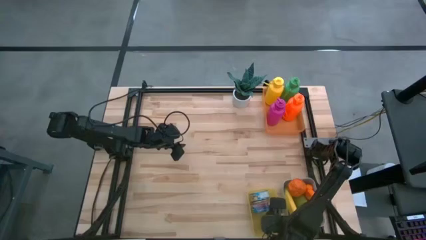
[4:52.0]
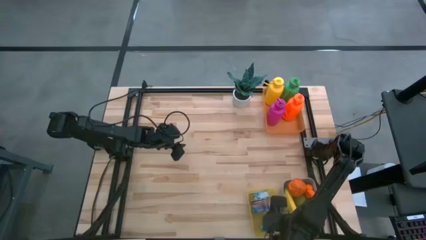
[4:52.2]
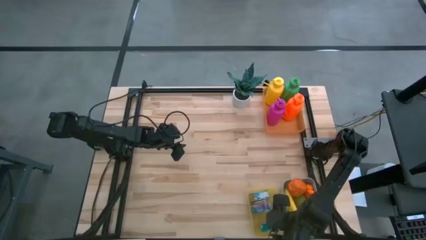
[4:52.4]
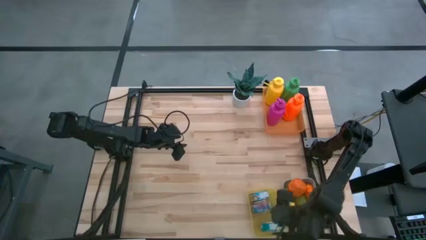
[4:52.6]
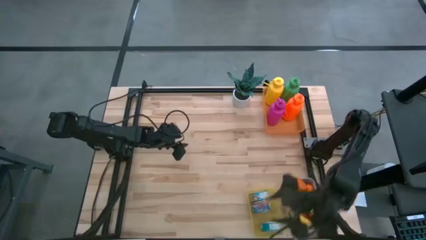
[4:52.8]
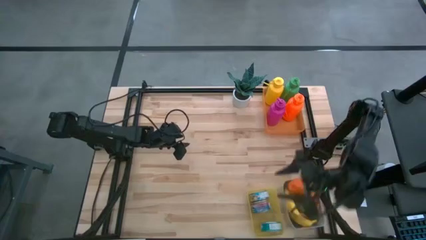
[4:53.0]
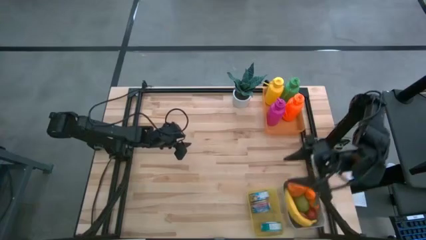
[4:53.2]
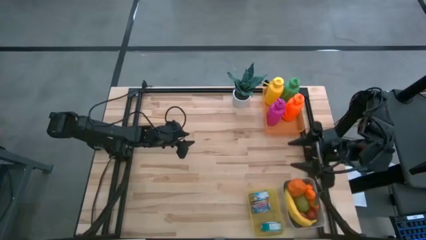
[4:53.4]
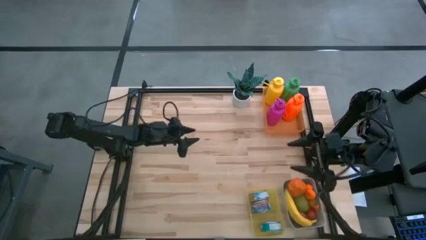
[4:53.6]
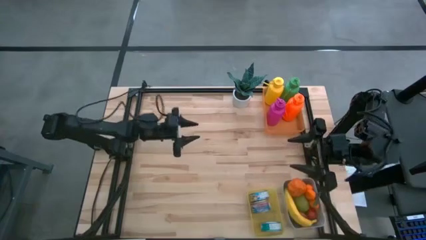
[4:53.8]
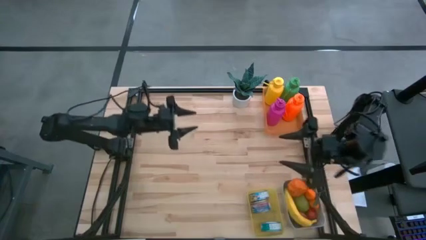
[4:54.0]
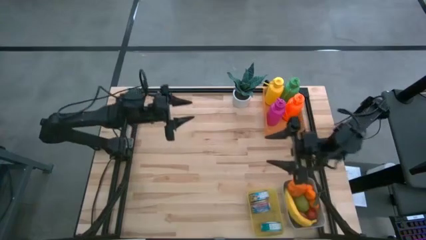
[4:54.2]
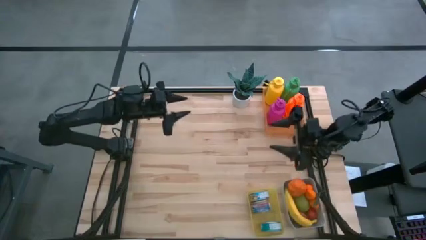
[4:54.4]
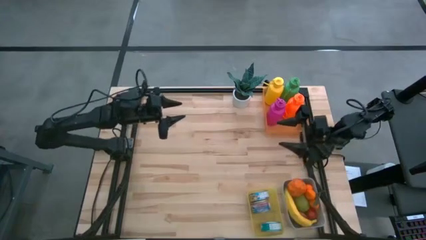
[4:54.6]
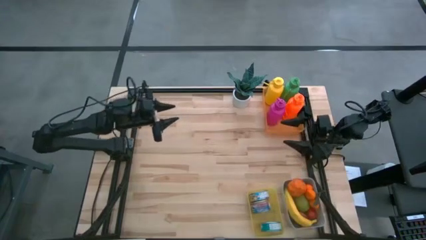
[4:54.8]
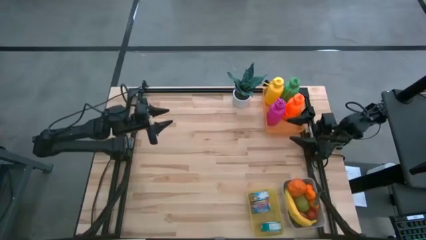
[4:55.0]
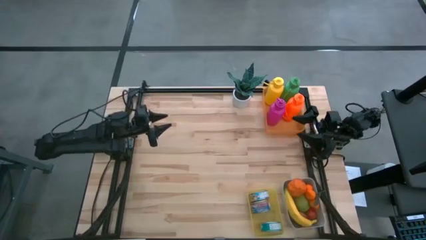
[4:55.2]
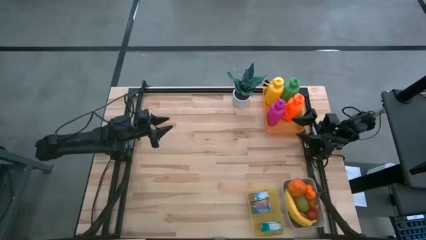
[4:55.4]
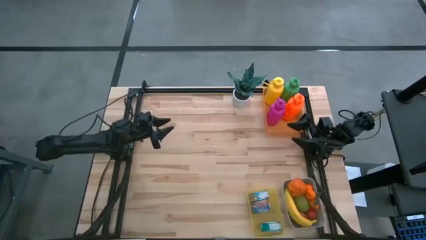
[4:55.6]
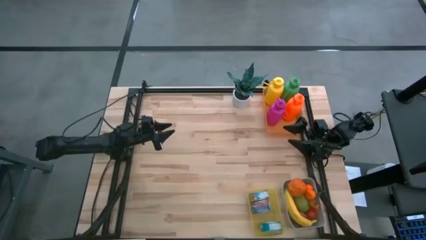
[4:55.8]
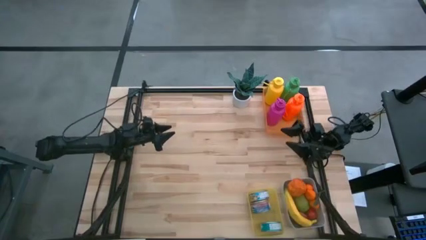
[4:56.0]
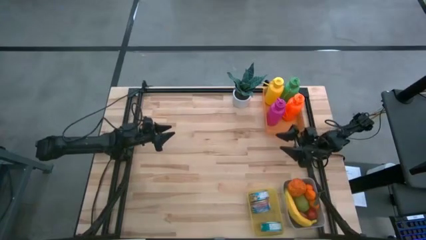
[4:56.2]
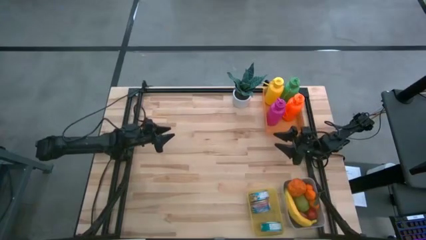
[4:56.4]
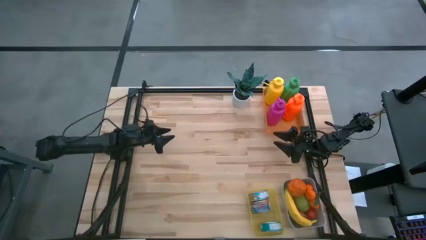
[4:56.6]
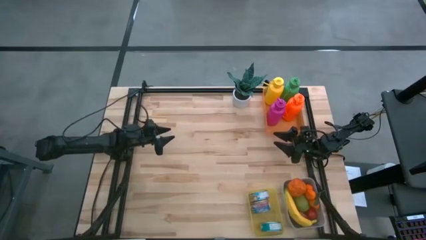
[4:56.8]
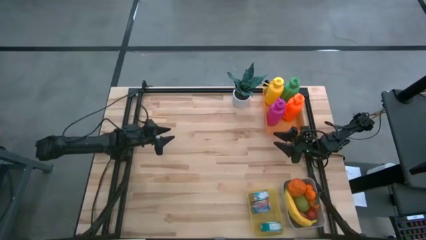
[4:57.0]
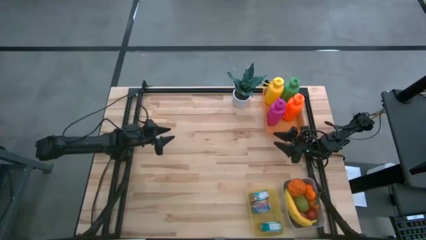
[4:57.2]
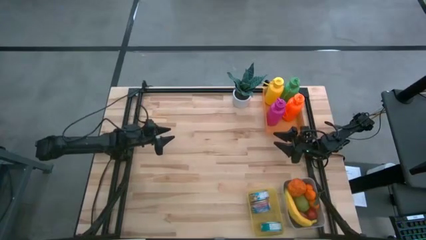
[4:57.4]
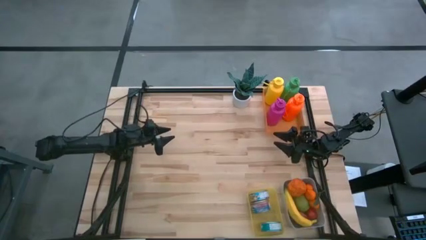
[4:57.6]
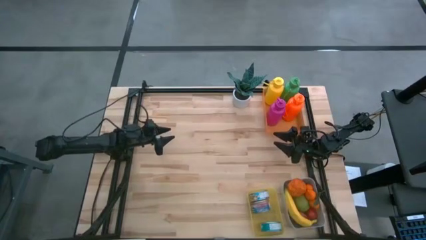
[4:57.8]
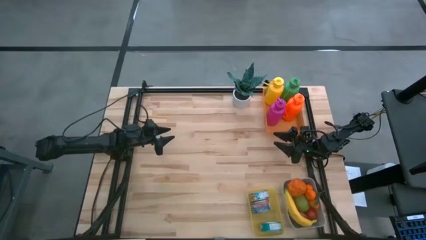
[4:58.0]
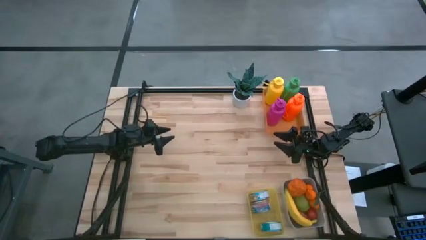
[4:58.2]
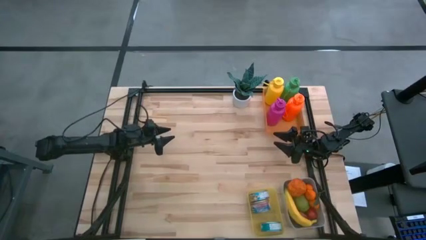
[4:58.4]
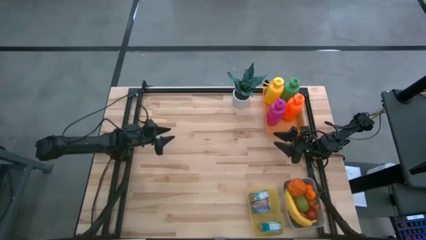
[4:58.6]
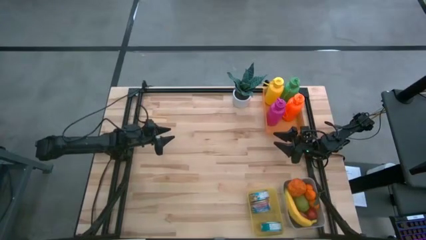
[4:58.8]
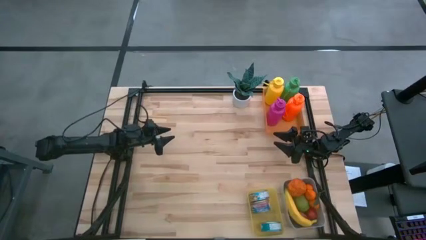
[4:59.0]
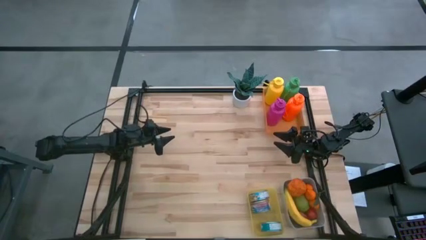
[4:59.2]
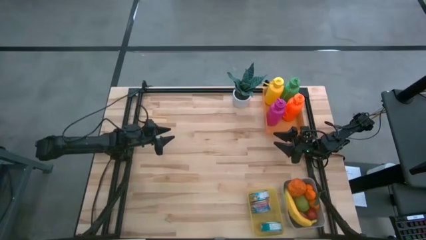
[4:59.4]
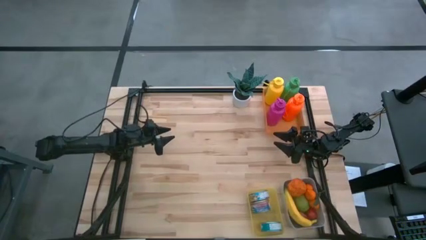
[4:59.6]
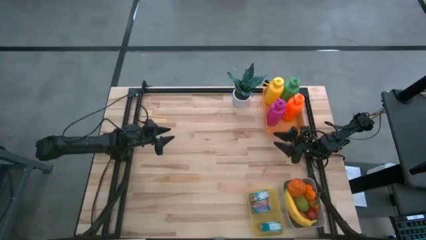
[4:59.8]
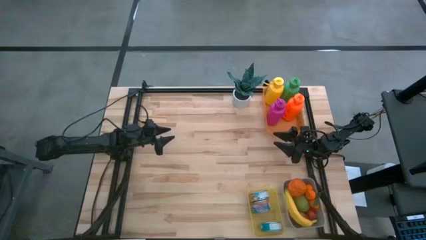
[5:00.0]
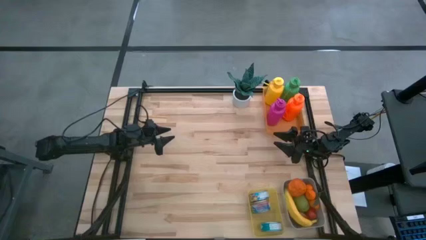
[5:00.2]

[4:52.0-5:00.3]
Task: Pick & Place Food Item
Return to Home Position

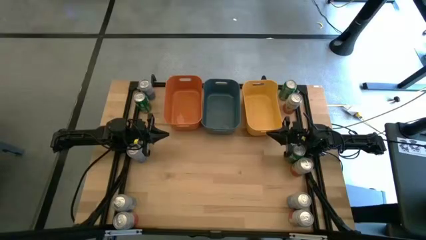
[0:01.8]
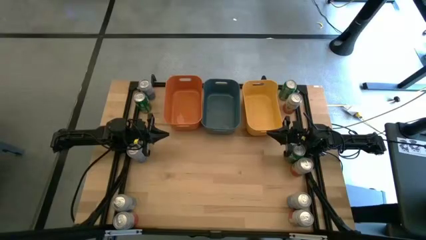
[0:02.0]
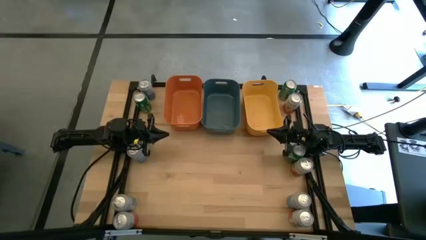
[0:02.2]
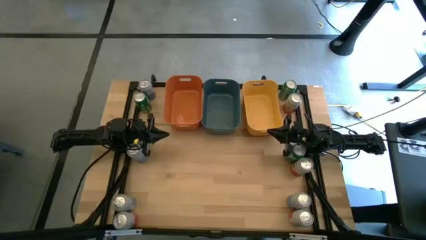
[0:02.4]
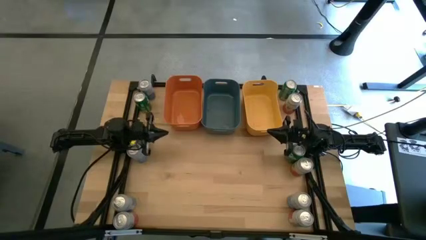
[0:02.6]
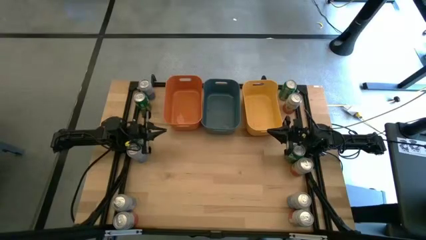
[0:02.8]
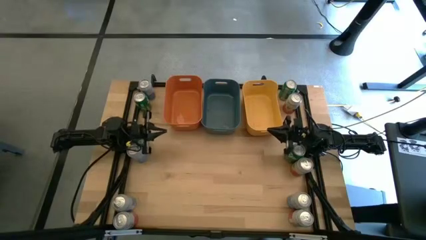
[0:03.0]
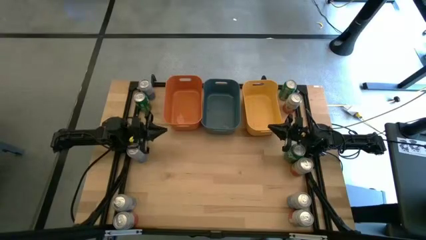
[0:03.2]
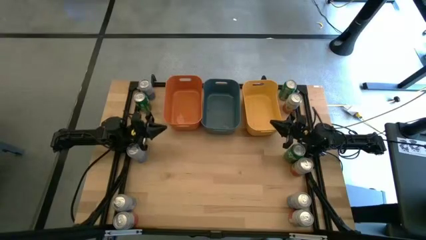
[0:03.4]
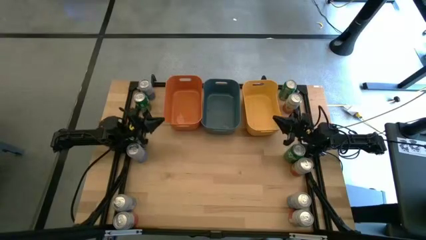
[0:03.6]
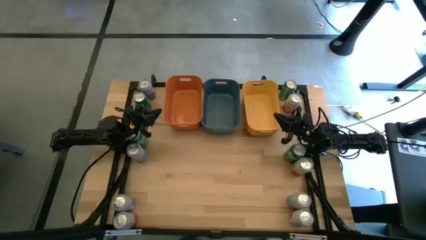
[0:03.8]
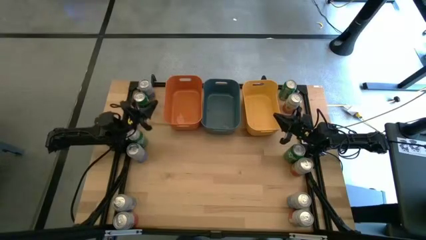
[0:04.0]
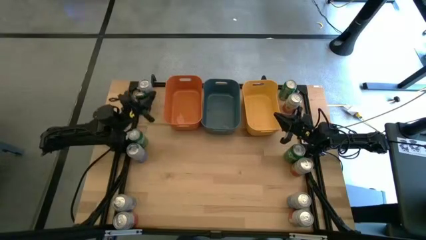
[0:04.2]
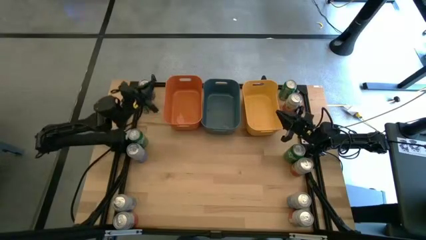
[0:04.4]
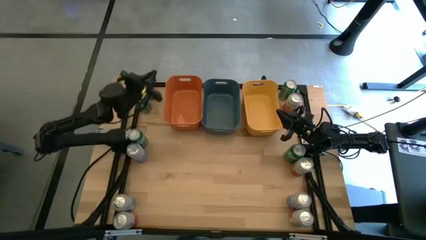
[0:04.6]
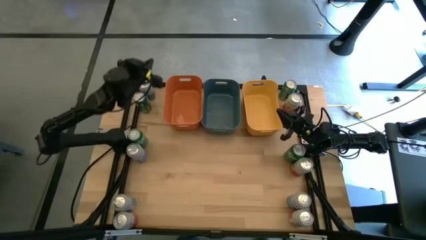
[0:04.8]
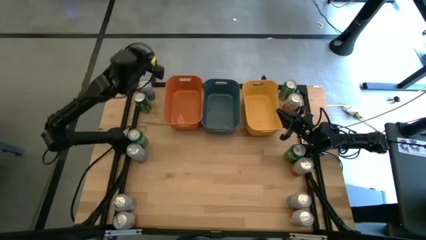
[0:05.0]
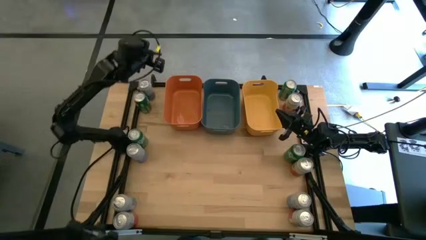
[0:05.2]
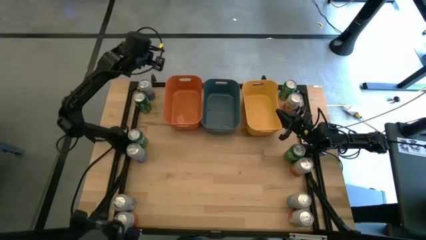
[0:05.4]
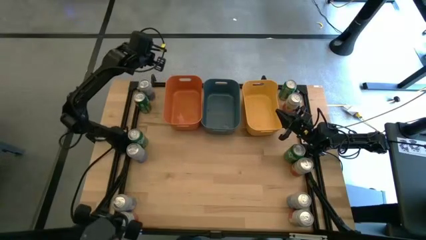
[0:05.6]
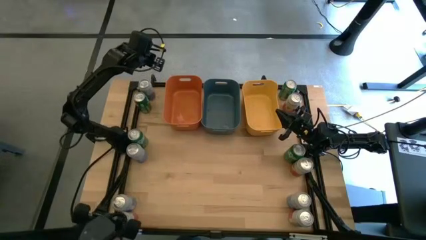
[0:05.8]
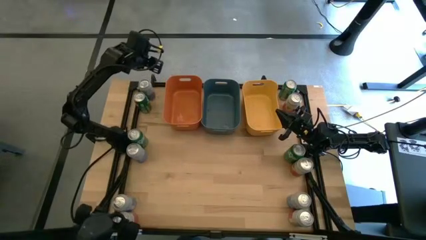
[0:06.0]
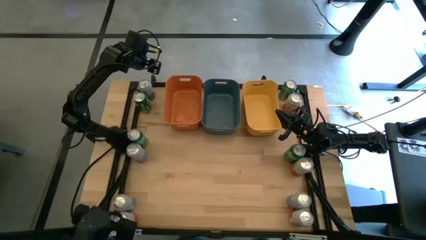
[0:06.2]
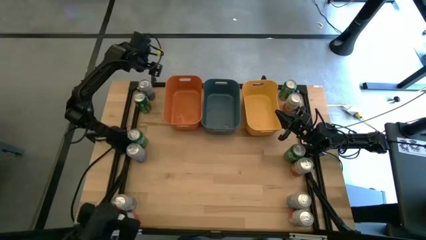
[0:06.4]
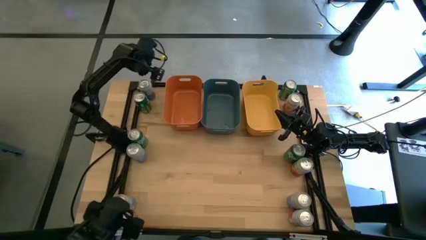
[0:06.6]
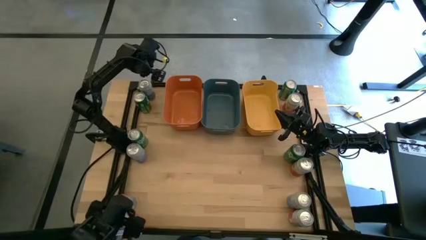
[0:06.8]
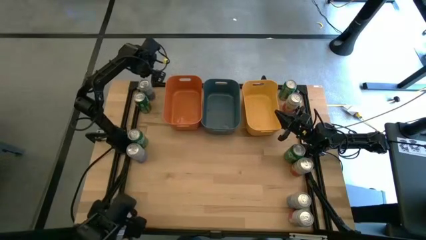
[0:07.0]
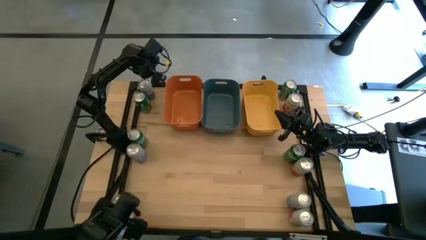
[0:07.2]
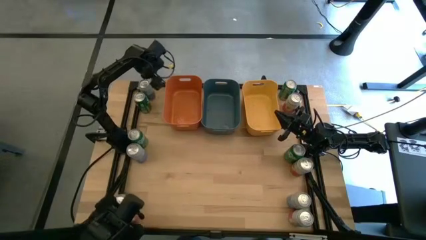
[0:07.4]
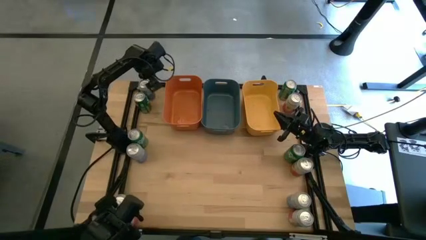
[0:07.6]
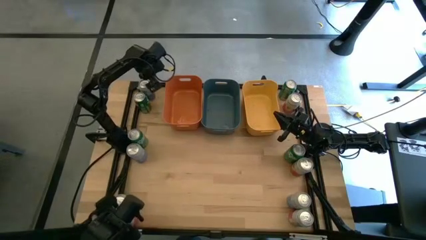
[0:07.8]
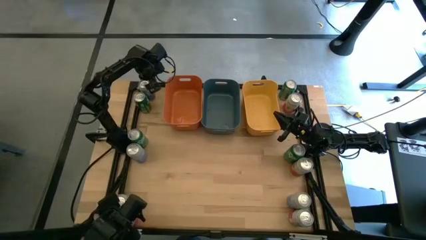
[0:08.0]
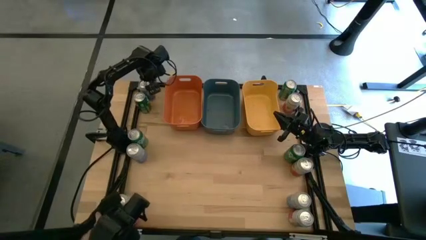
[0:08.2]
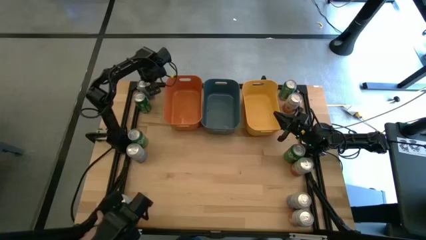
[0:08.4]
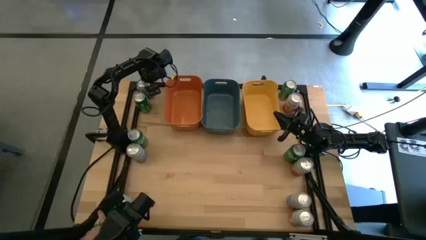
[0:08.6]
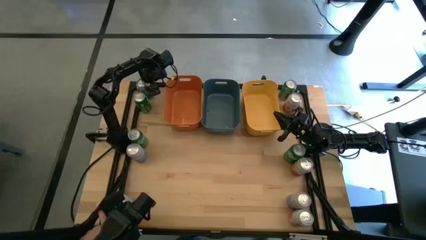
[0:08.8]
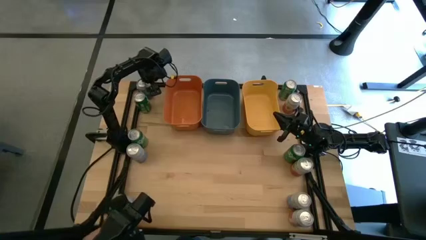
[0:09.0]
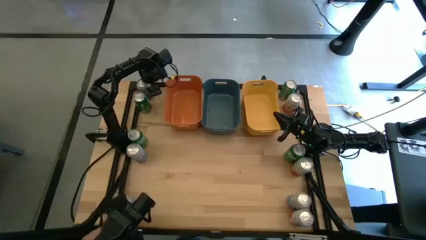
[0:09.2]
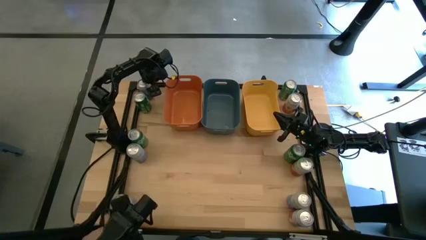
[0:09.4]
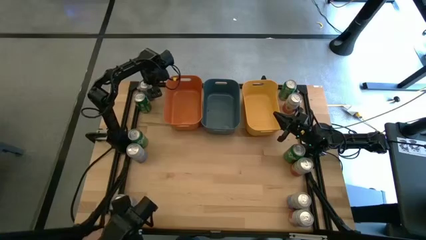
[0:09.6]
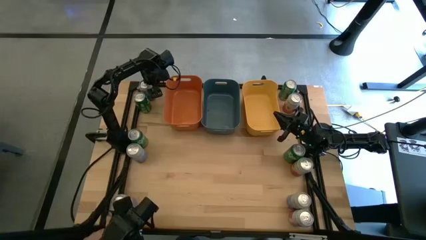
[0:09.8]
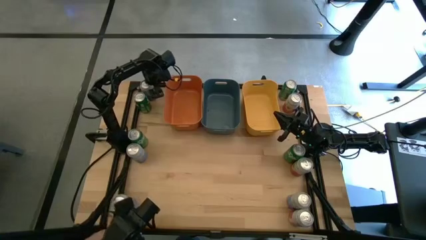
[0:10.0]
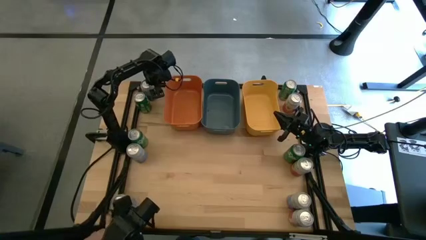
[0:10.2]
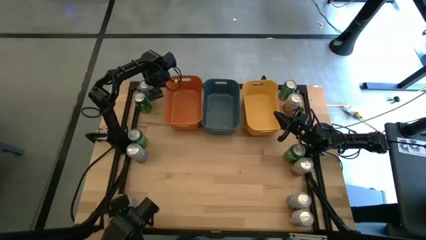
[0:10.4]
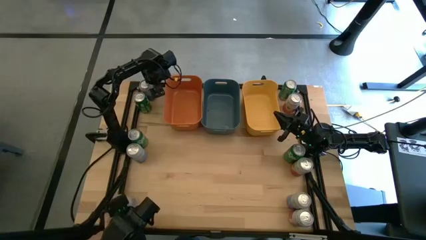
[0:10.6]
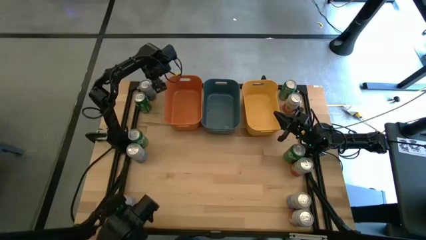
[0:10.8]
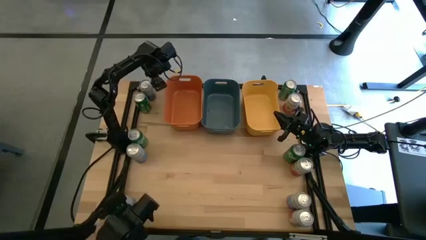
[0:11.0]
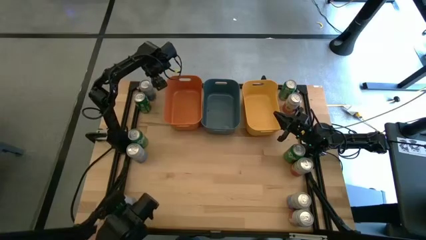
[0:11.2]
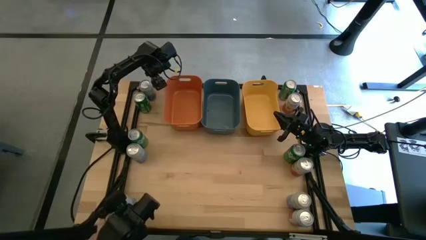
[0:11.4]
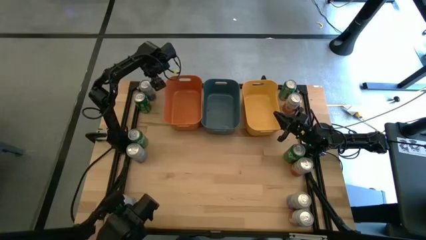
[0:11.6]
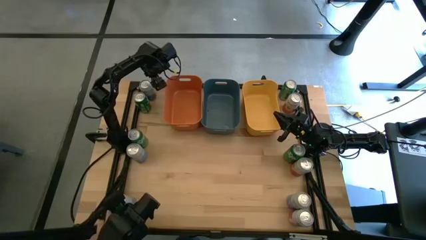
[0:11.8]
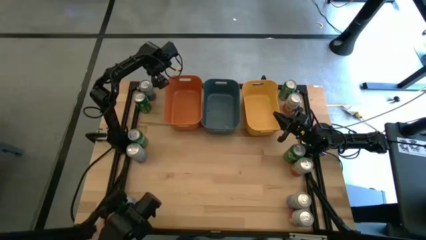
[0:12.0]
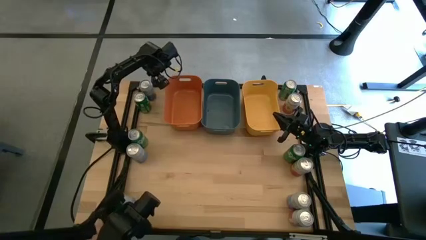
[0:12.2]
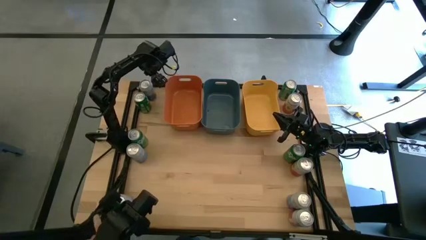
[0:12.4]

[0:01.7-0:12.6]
Task: Sort soda cans
Put the top left blue-white soda can into the orange bin
